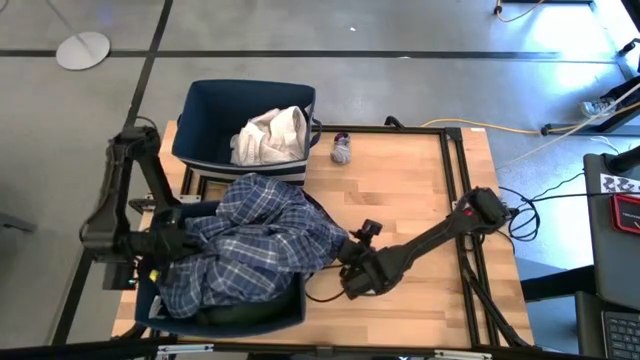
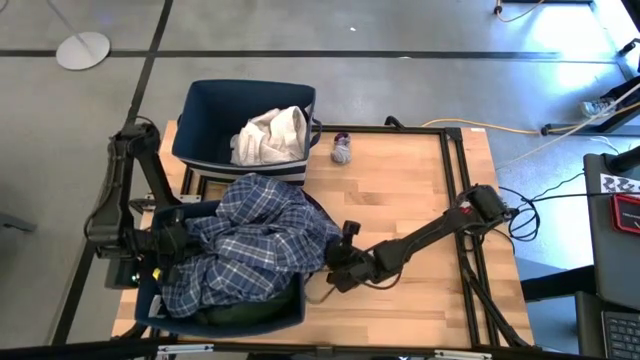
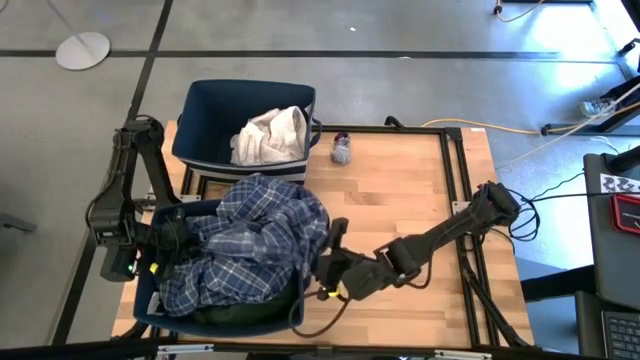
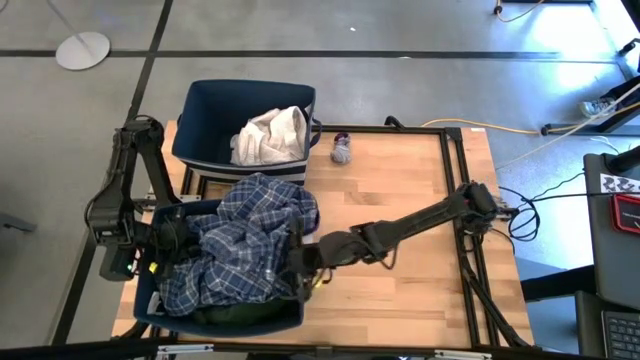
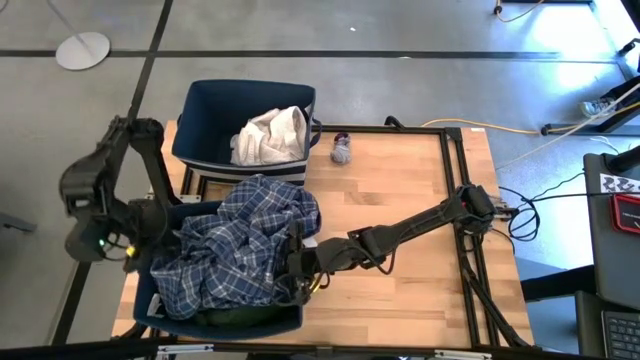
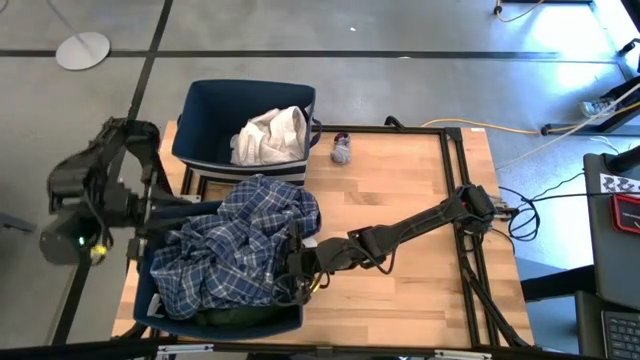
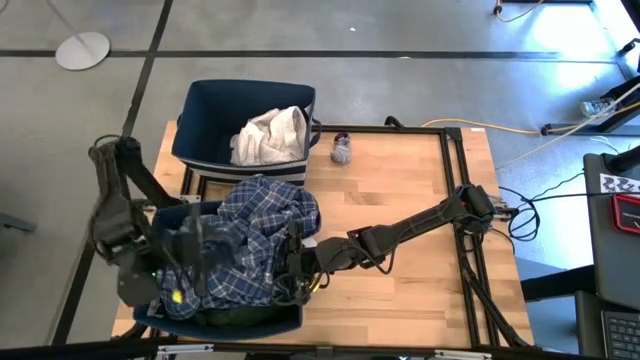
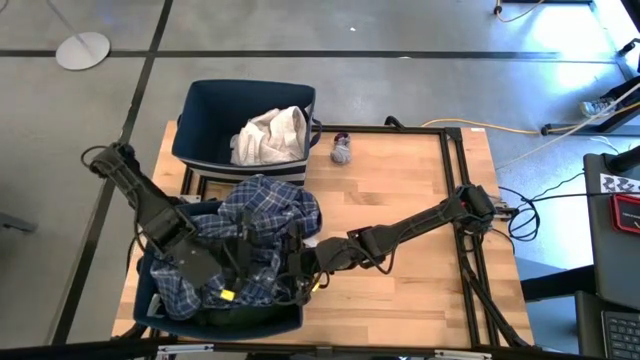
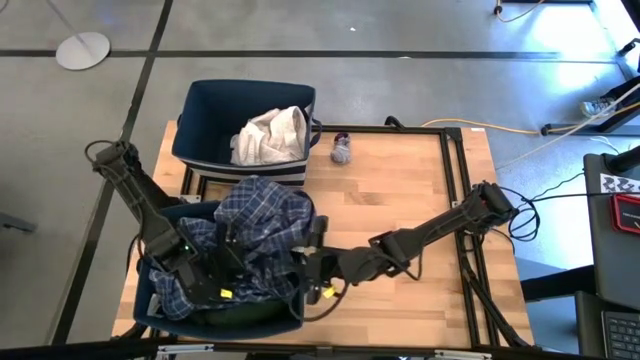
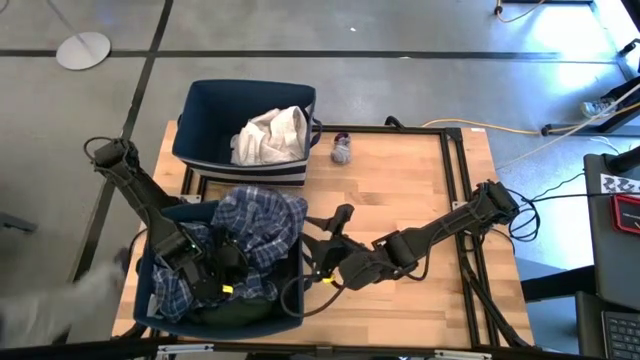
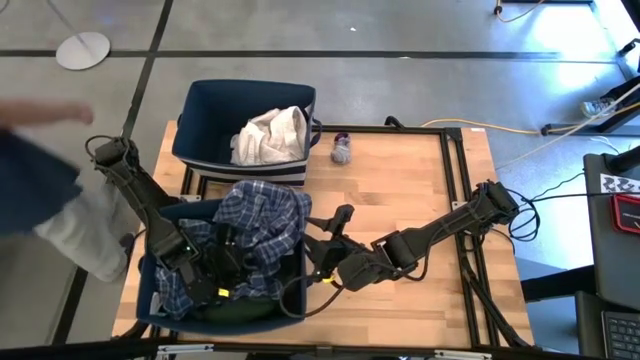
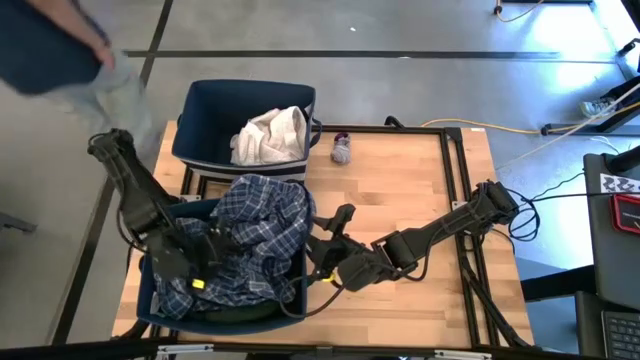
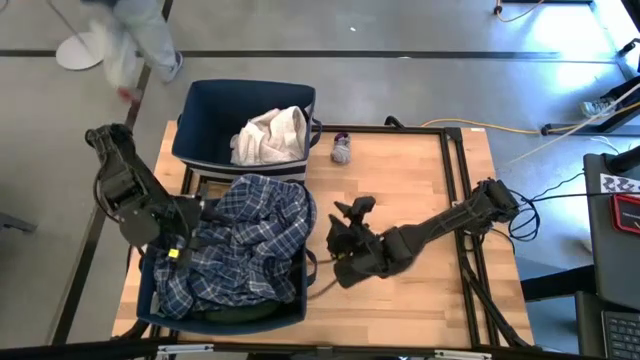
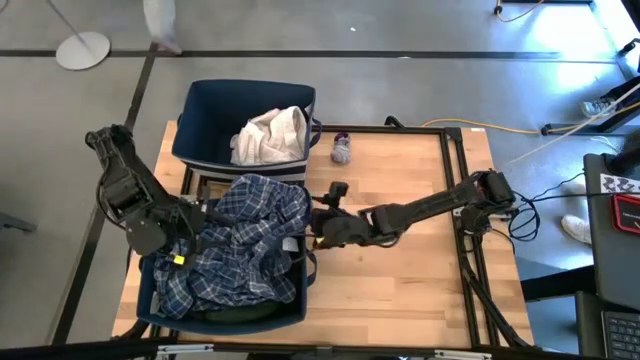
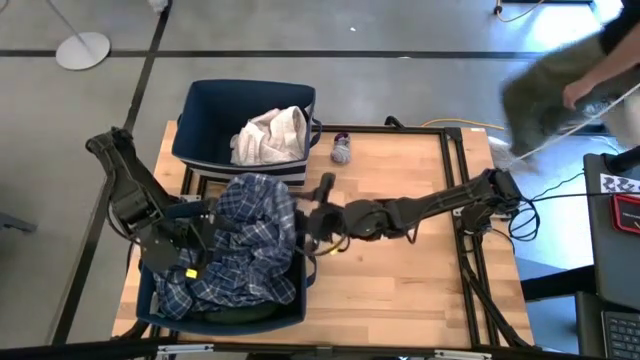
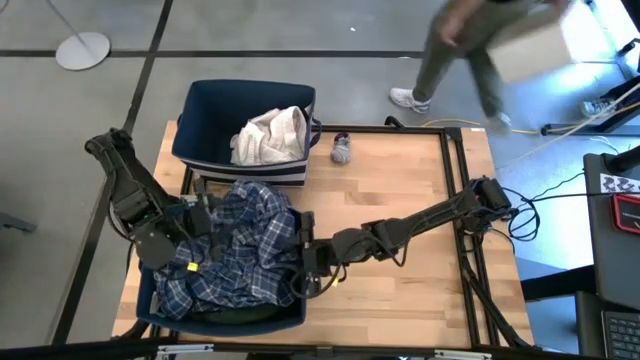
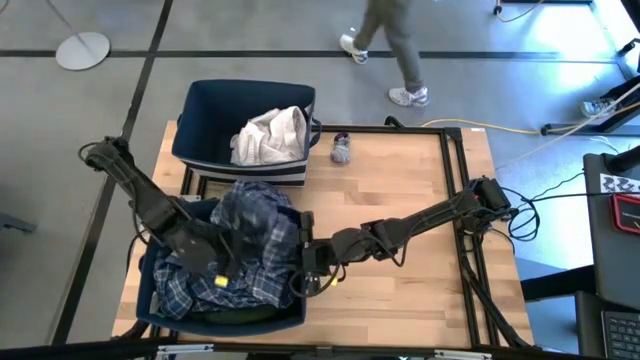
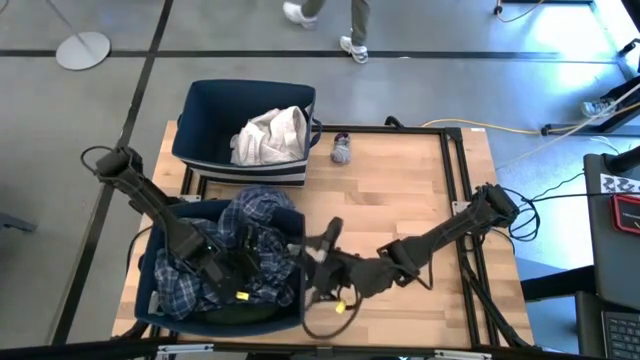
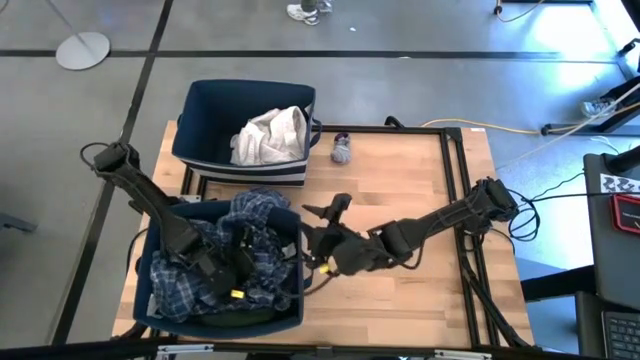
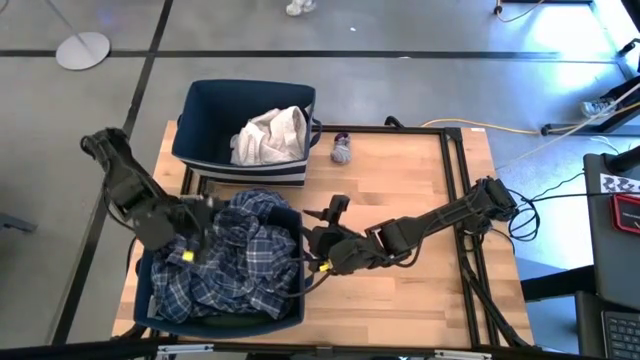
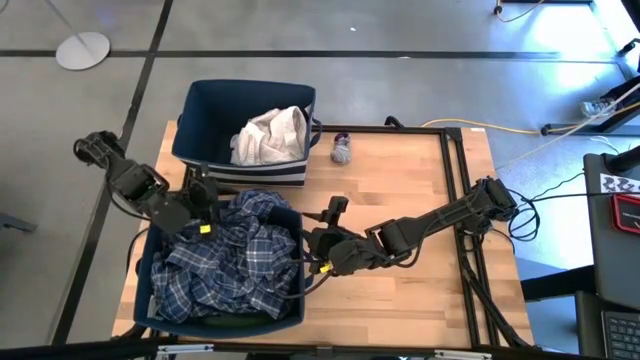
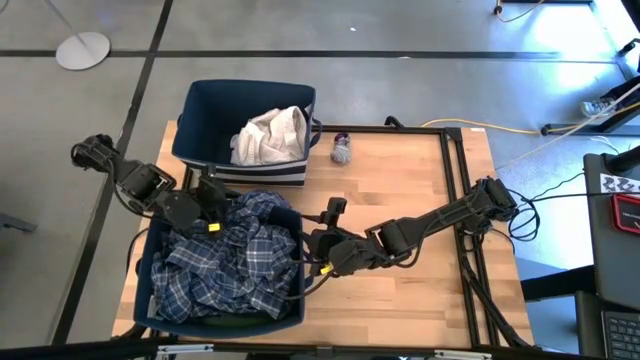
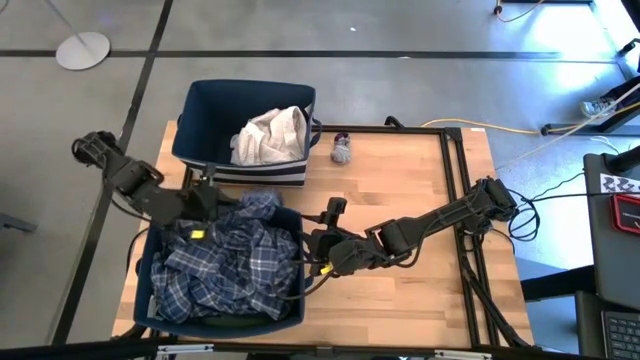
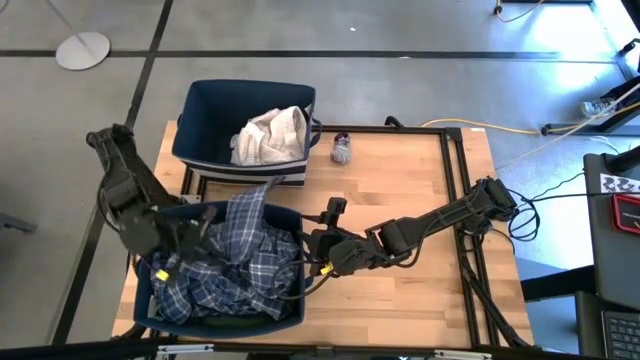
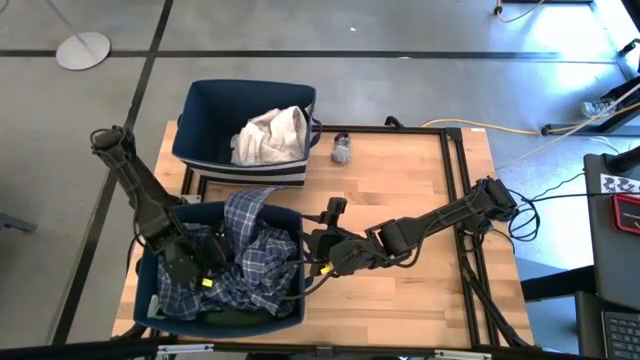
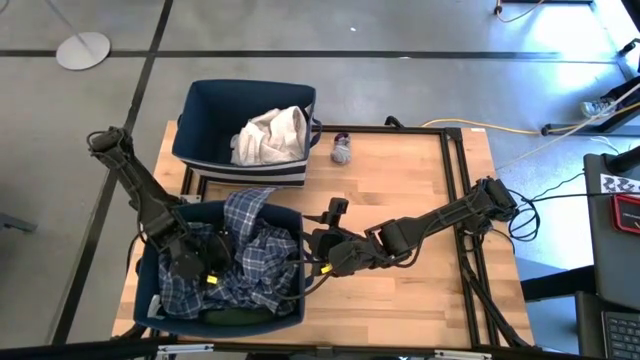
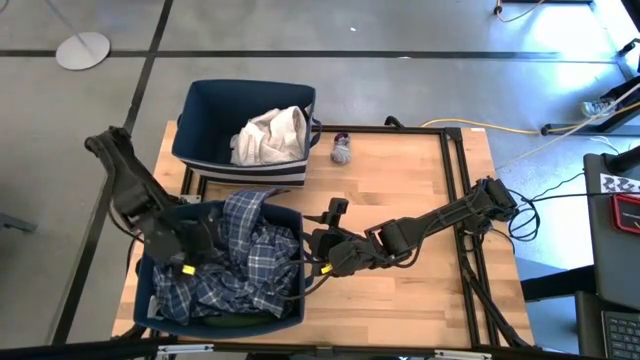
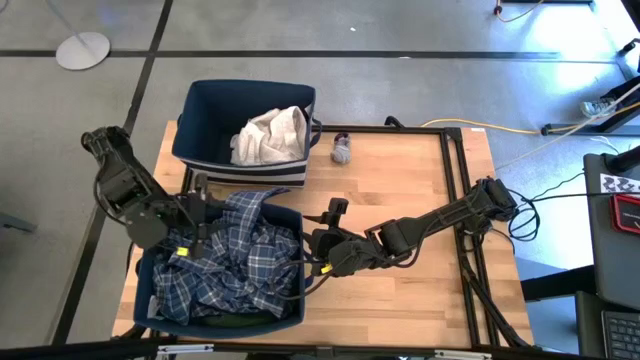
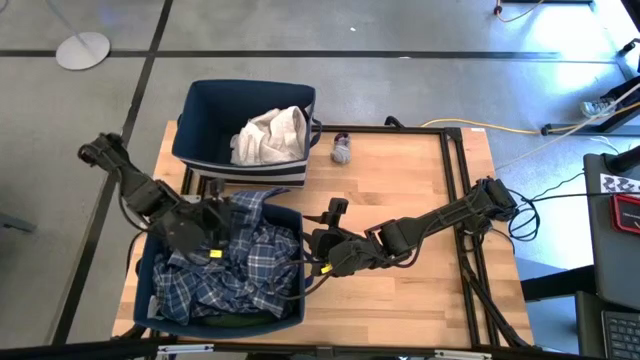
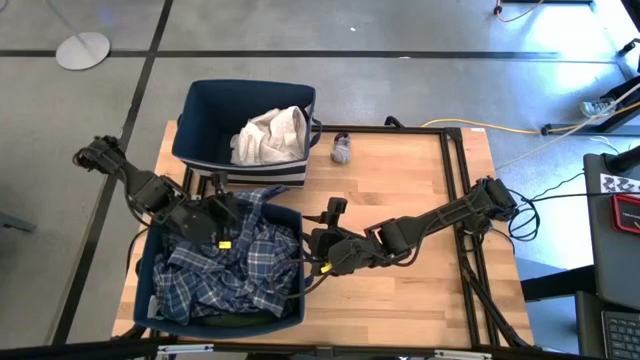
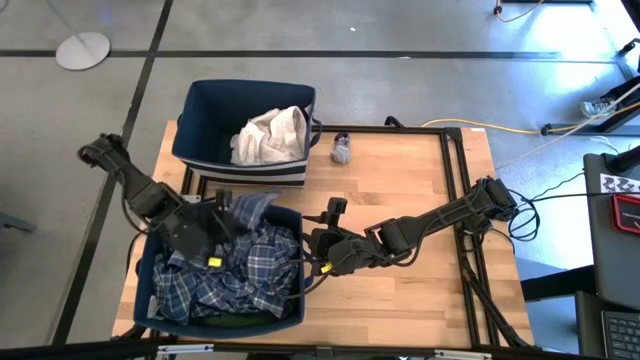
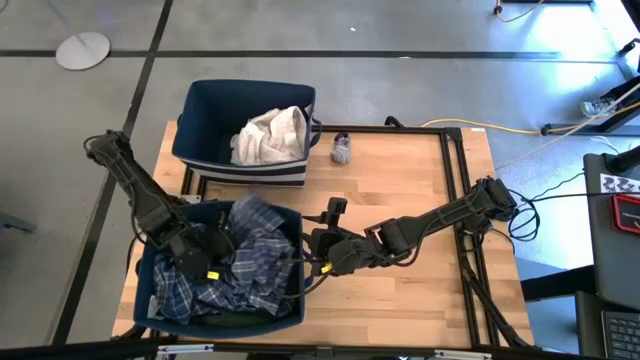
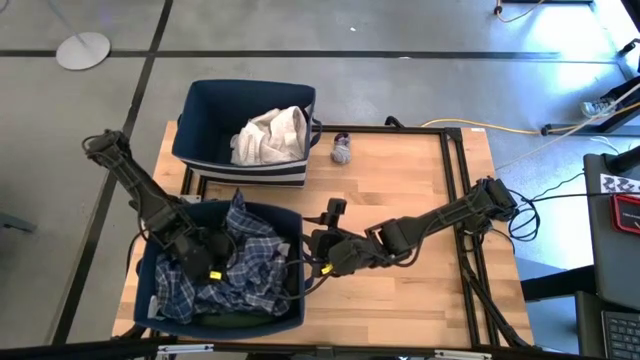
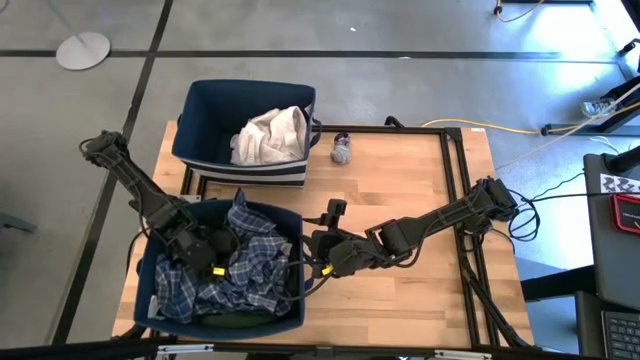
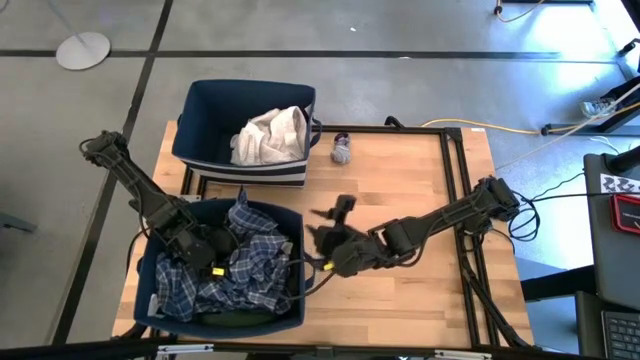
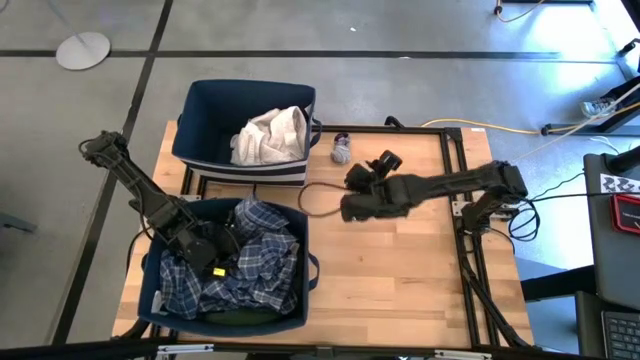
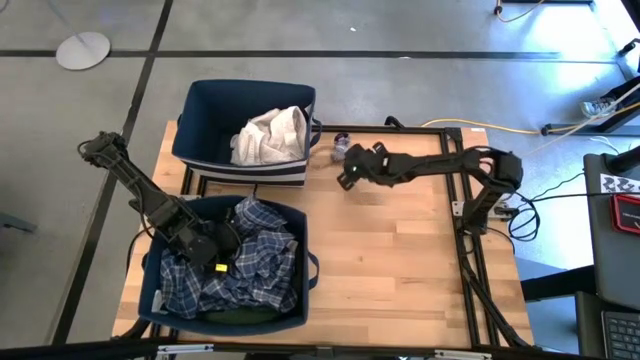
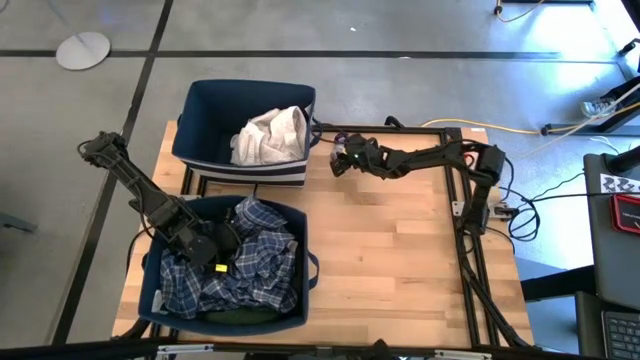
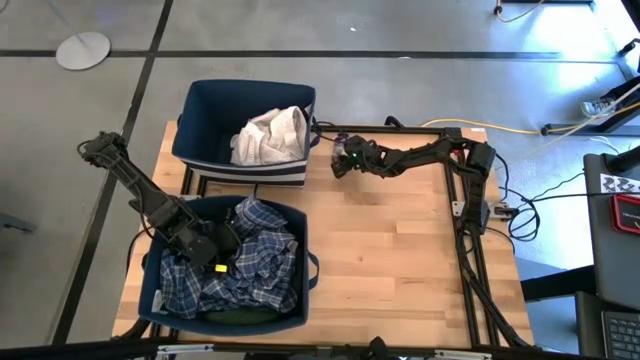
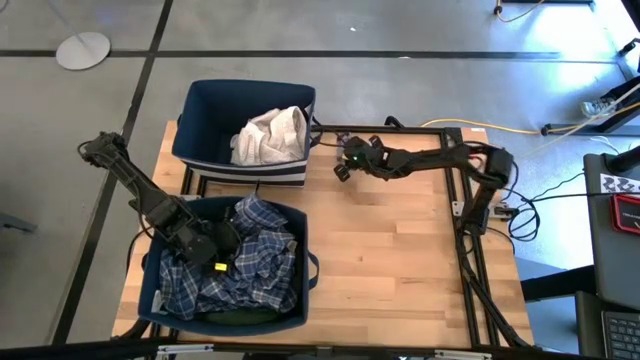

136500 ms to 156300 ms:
Task: Sort clothes
Put the blue checkered long sleeve into the bottom blue laundry organizer

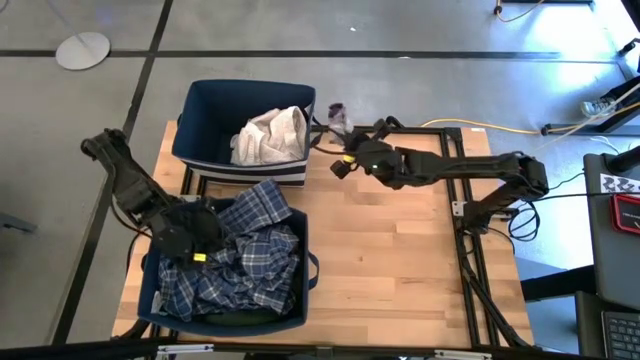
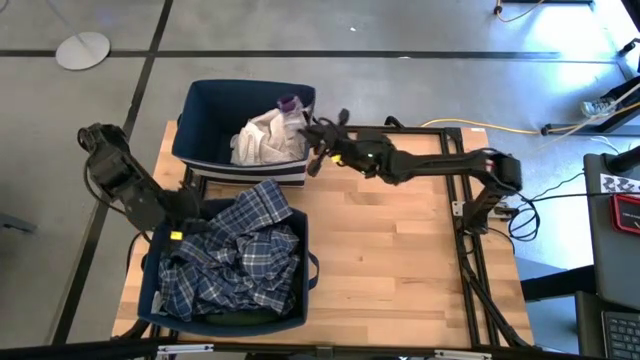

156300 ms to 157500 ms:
Put the gray socks into the top blue laundry organizer
